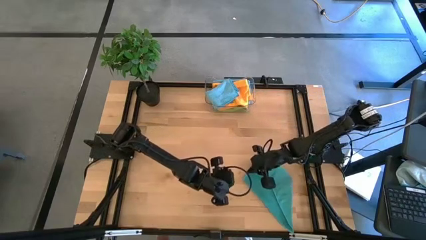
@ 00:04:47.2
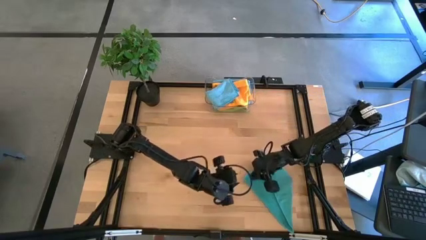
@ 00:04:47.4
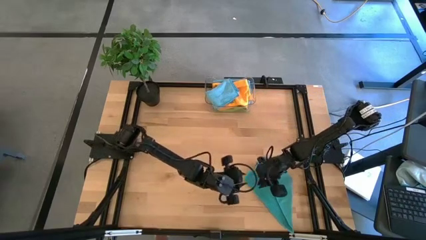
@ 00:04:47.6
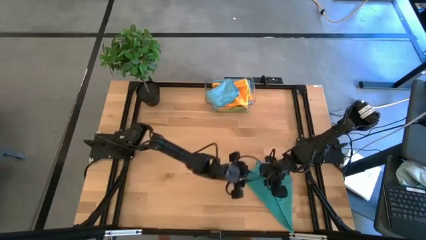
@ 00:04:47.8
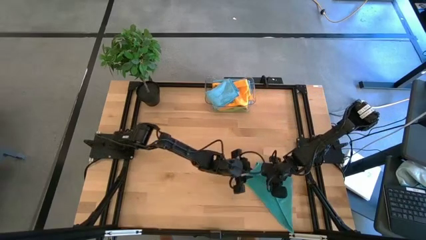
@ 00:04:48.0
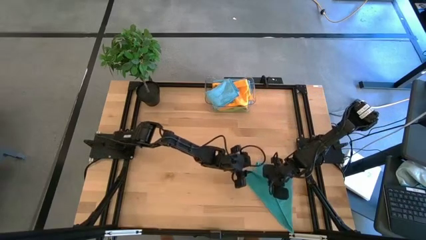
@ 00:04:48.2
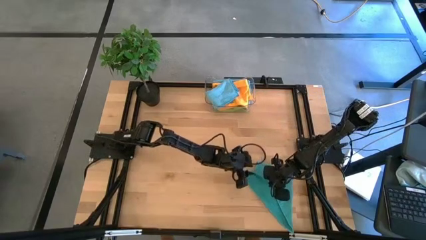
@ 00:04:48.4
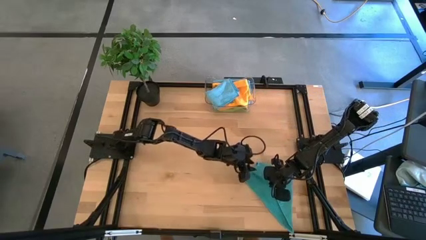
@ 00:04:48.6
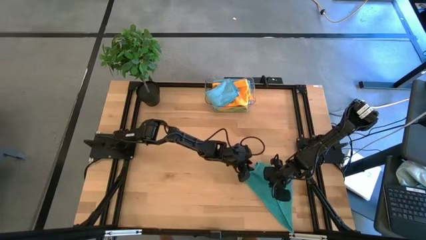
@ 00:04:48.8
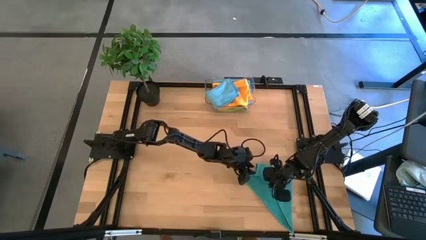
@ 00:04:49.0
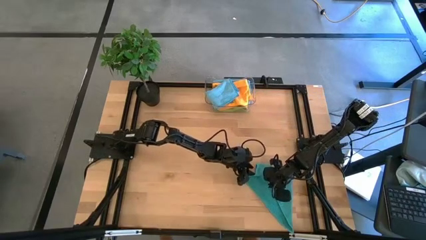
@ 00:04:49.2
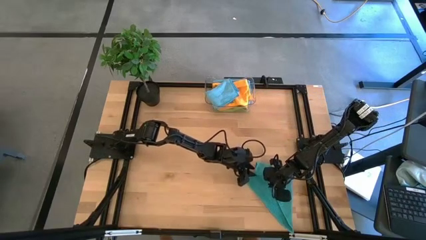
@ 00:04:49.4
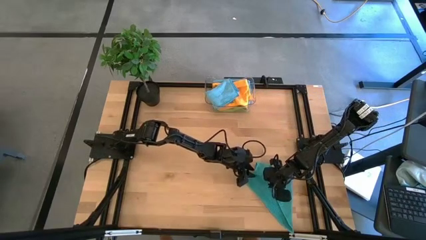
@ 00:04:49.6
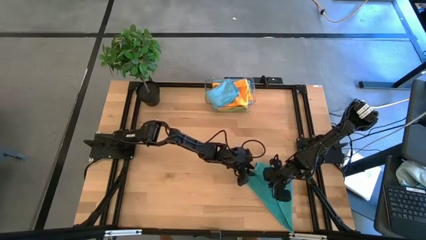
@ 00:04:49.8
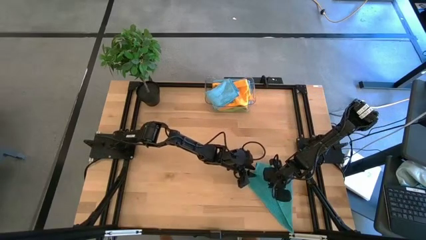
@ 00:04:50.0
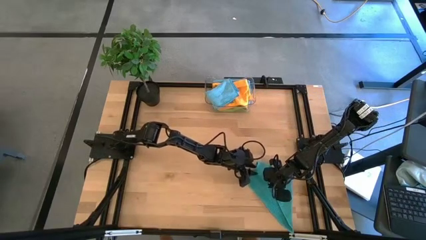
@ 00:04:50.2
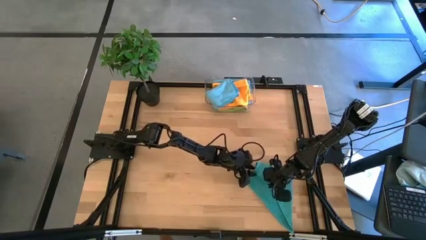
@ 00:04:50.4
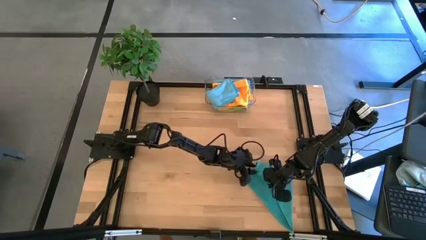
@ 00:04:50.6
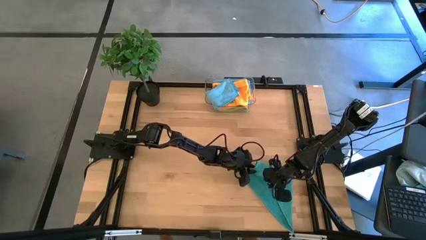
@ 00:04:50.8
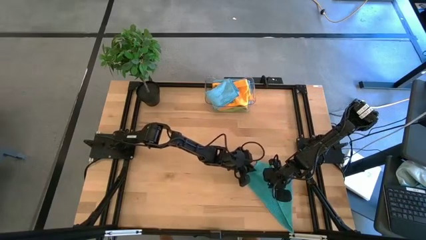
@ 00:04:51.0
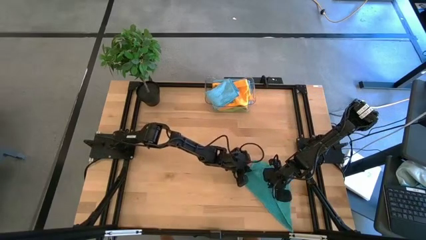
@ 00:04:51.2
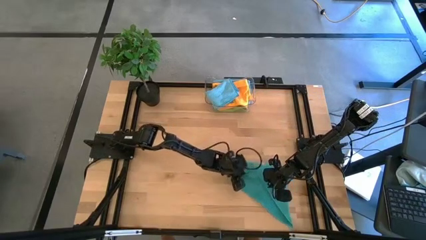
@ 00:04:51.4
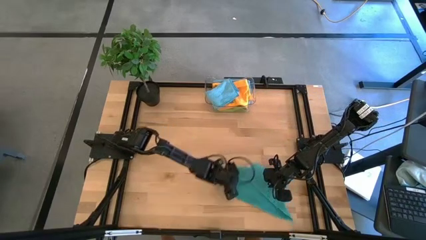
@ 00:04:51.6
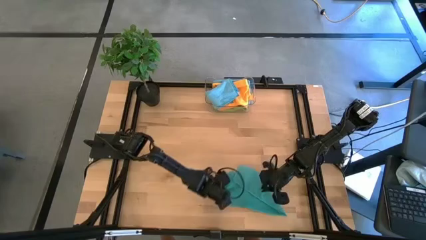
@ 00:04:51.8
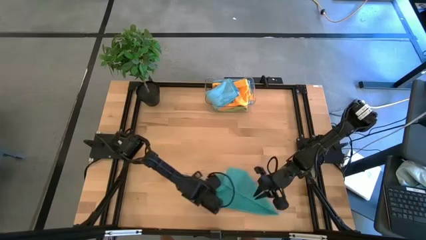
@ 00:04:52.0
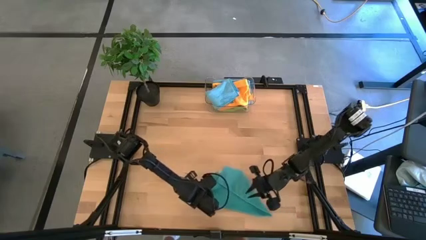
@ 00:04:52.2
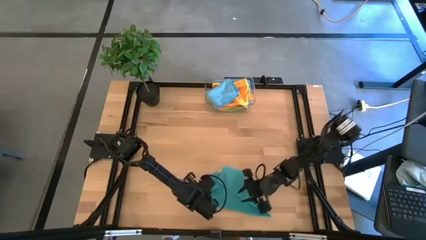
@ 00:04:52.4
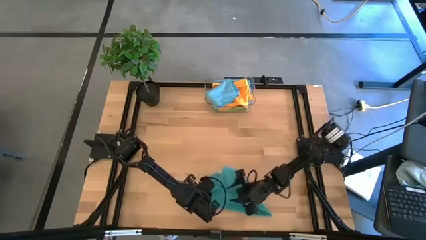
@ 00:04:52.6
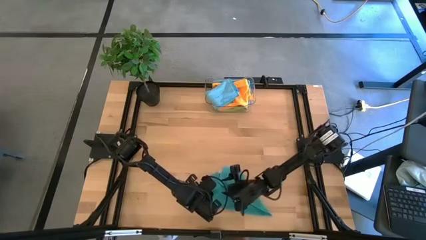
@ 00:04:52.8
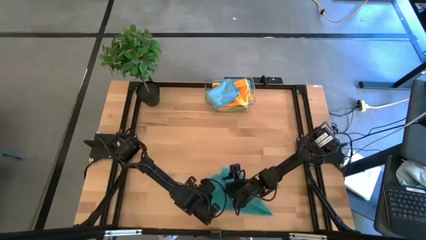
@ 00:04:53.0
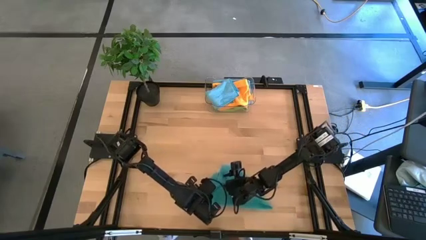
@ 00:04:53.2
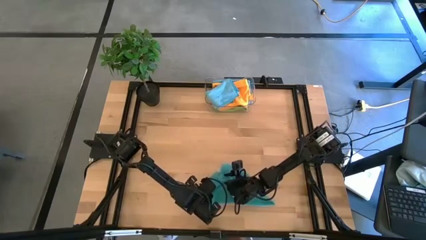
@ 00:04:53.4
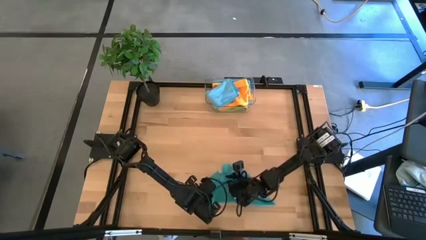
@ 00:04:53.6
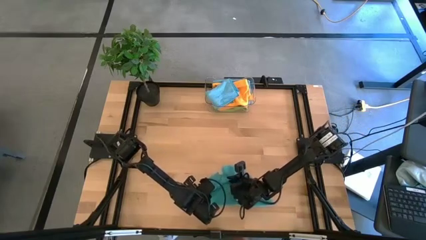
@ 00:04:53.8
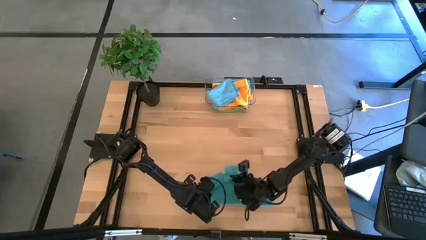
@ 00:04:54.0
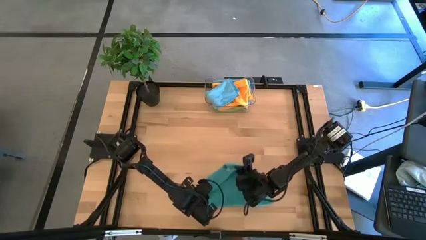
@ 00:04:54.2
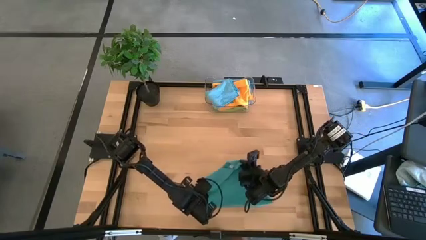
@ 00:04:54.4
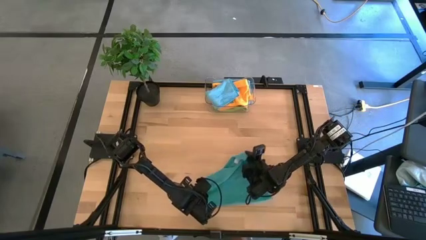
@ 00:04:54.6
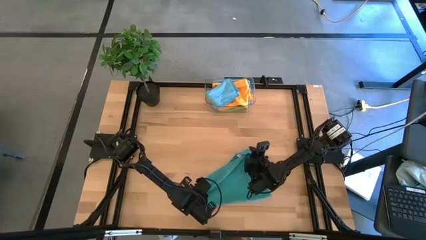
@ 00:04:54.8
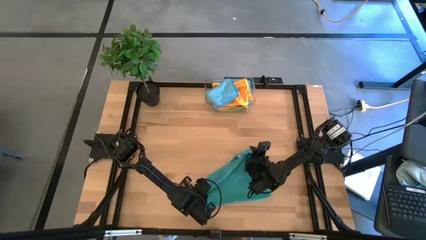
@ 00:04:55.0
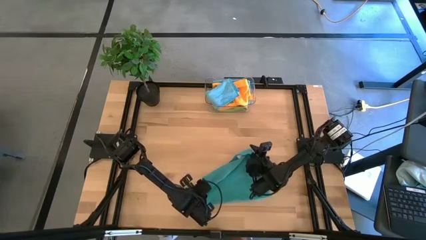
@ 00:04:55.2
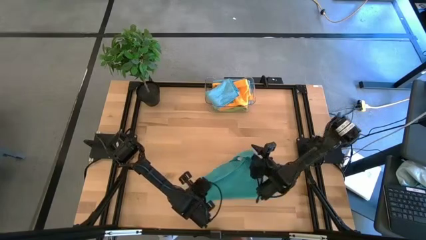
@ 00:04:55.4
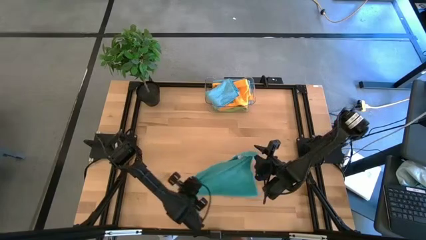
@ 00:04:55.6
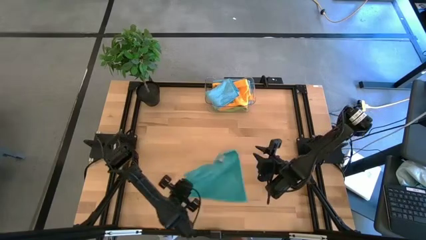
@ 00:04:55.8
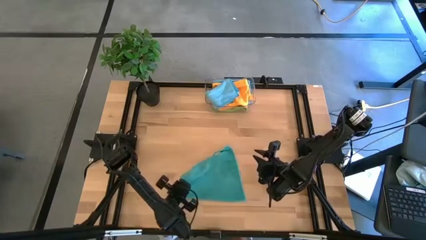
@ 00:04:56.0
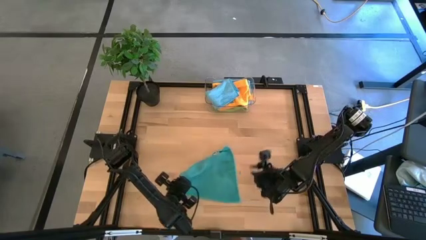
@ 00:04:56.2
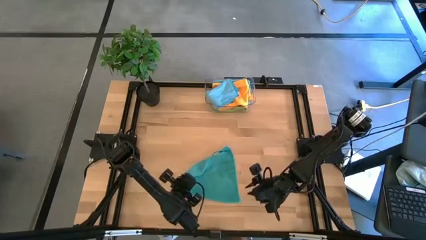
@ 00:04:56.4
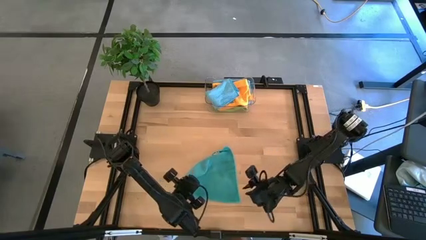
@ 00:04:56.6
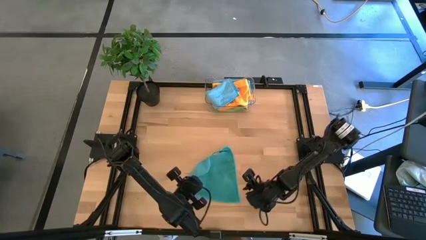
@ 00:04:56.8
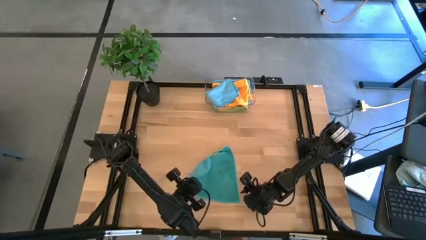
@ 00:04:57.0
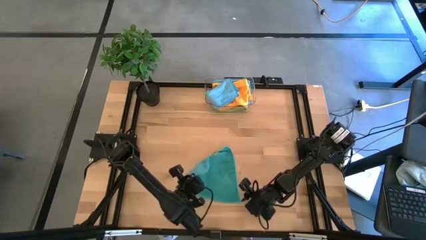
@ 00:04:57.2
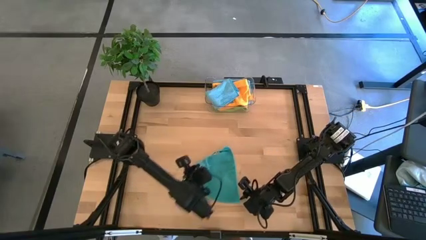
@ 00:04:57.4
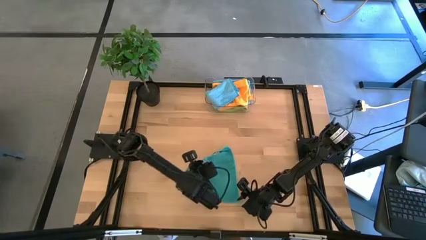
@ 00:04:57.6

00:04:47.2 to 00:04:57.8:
Task: Fold microfiber towels
Fold the blue microfiber towel

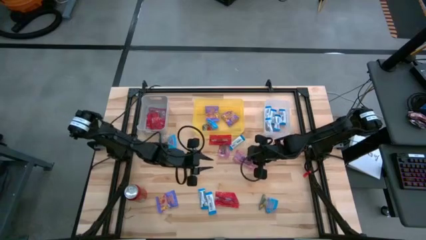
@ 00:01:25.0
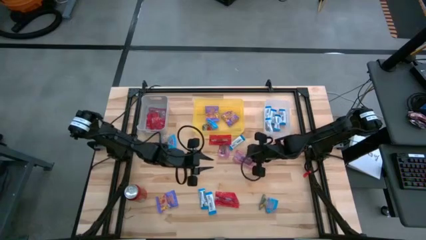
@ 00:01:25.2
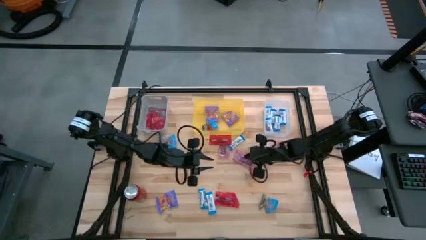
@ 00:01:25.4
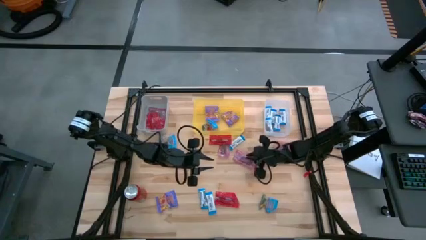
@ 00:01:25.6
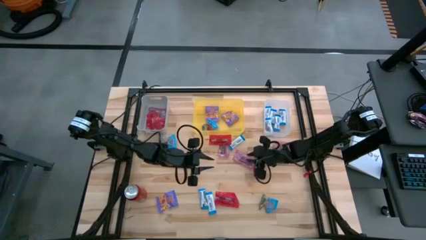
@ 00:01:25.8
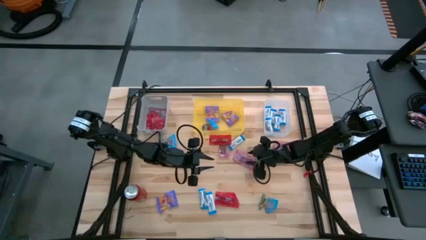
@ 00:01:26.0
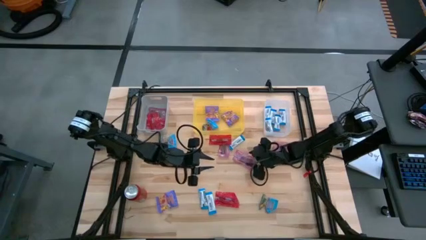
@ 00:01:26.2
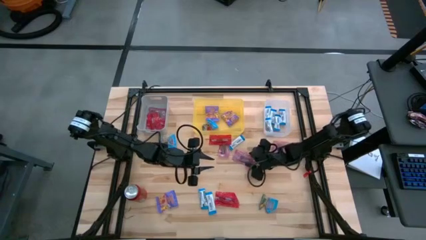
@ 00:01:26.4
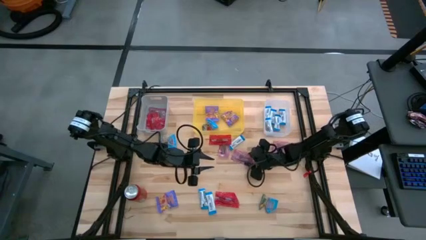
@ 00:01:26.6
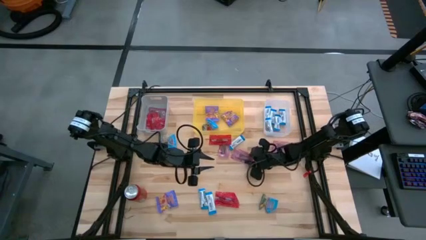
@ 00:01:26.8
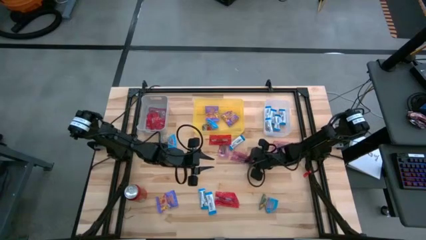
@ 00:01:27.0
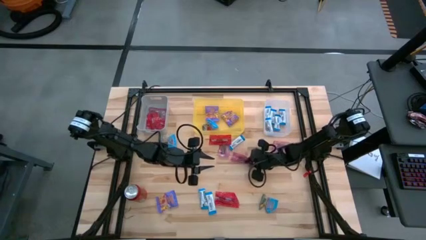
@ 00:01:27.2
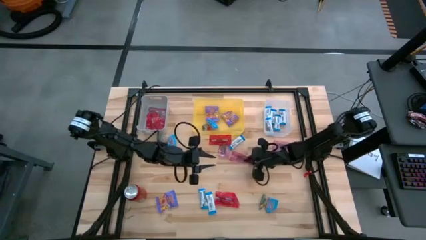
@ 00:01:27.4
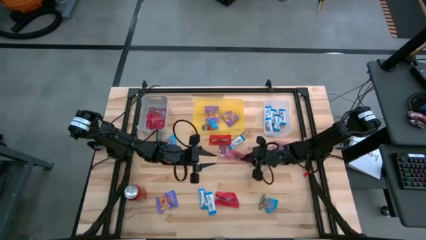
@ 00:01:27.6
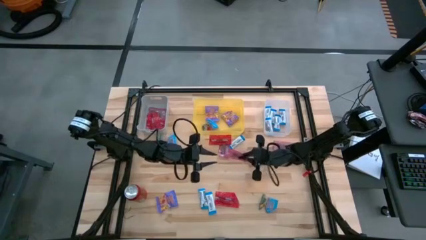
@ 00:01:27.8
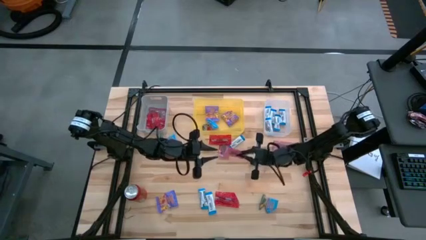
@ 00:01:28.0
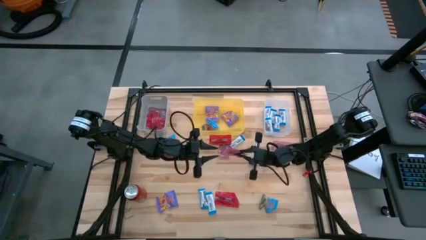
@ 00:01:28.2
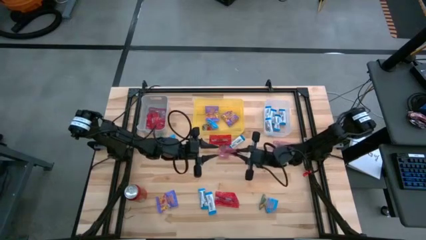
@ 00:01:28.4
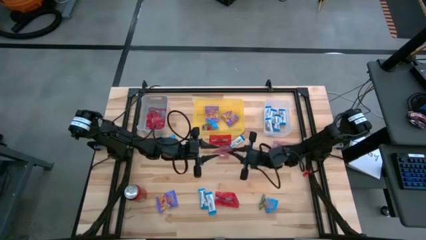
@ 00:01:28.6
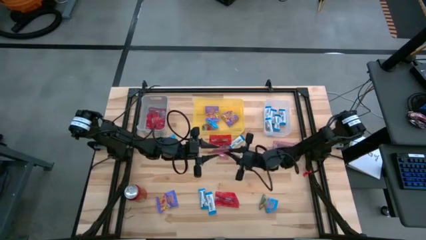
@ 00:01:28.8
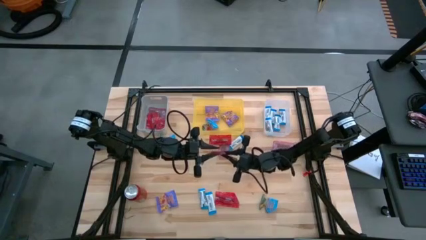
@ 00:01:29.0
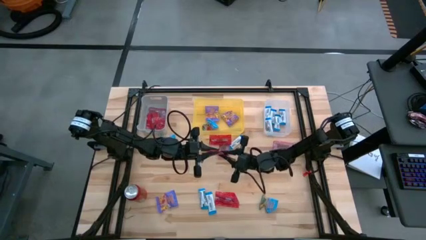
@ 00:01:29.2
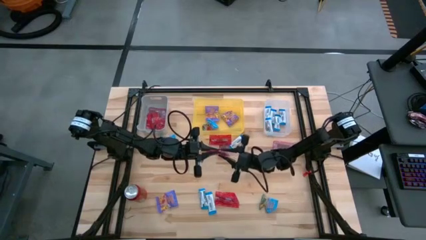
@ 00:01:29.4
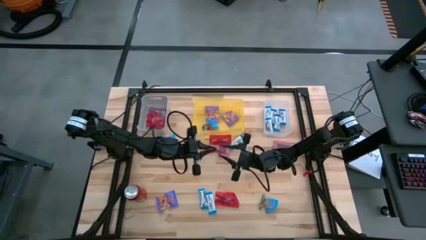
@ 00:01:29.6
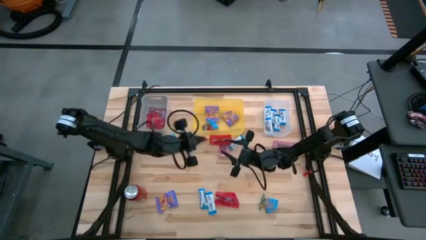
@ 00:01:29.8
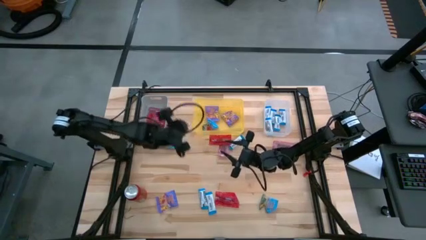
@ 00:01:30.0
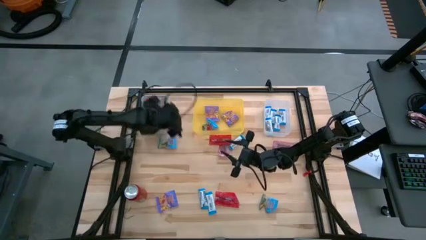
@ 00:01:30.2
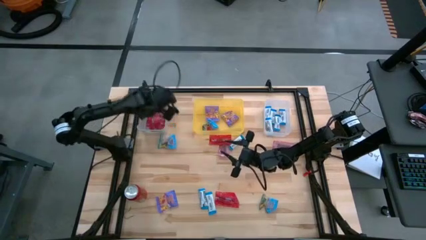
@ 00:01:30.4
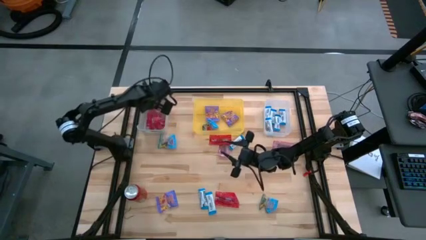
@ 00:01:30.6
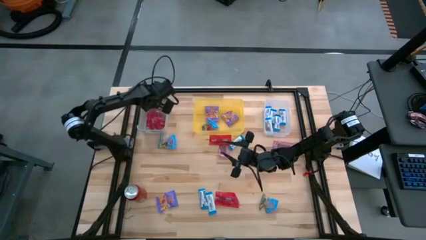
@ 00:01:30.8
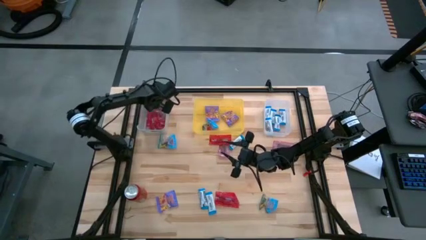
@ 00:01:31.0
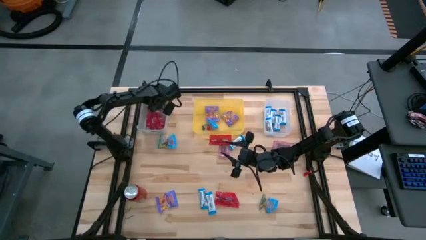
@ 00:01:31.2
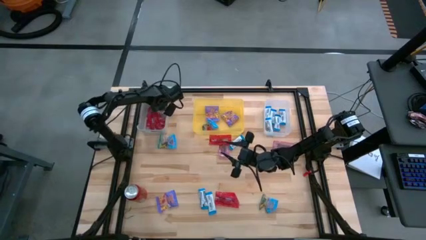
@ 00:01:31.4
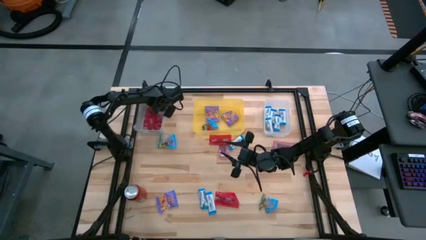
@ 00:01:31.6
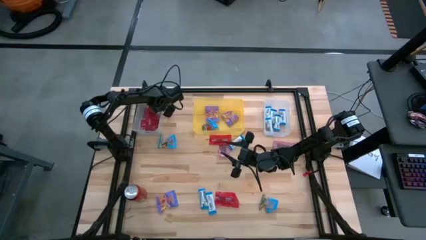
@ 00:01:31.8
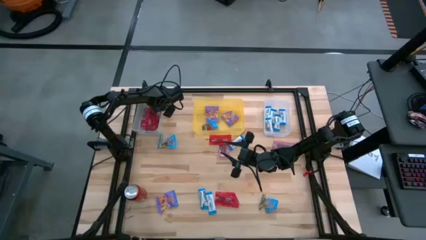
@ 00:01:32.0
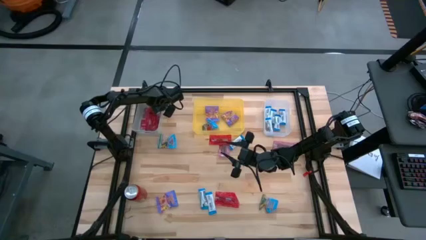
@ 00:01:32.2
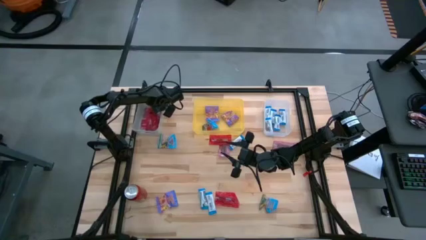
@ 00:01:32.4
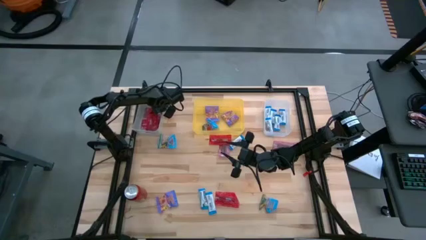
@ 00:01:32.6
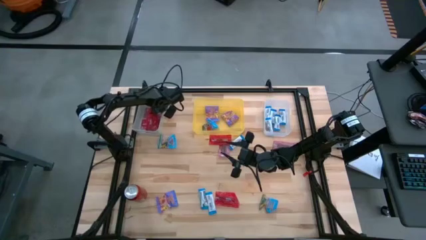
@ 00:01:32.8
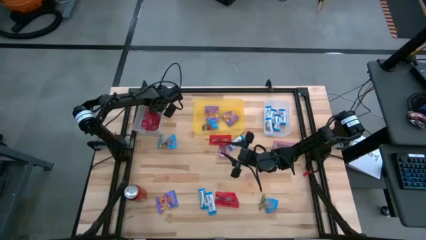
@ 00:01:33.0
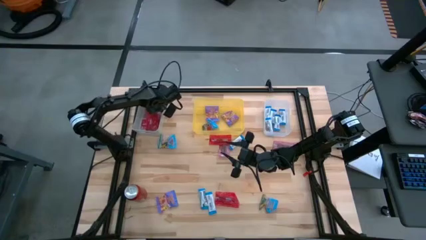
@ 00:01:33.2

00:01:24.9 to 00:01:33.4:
Task: Sort candy
Put the red gummy into the gray bin
